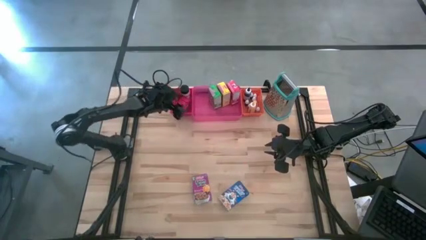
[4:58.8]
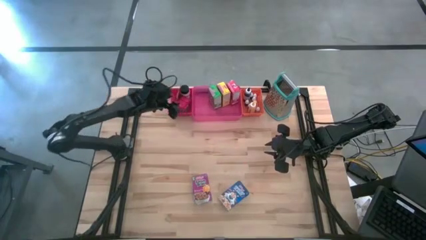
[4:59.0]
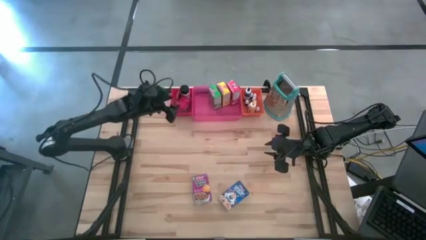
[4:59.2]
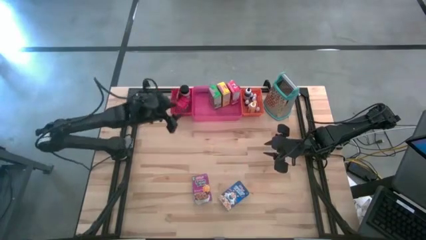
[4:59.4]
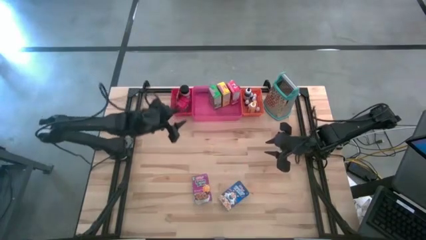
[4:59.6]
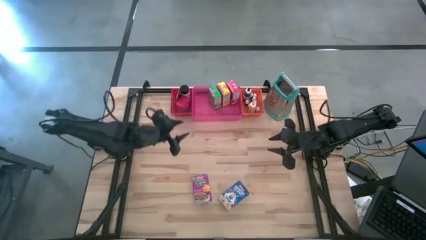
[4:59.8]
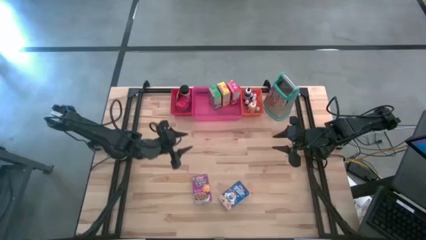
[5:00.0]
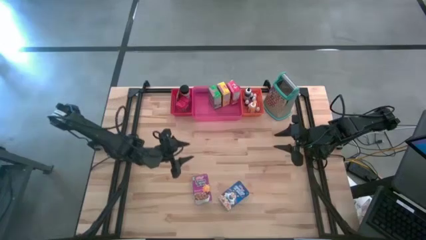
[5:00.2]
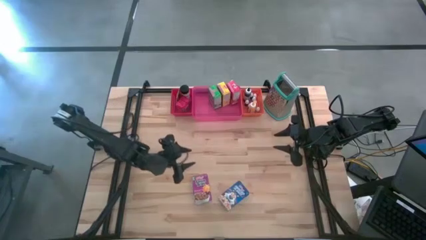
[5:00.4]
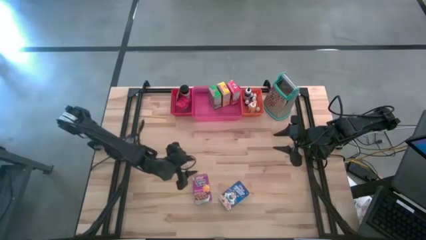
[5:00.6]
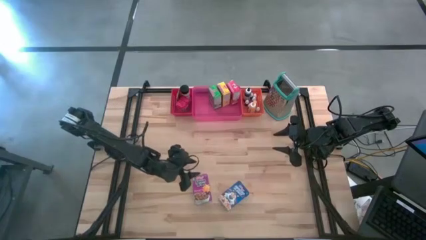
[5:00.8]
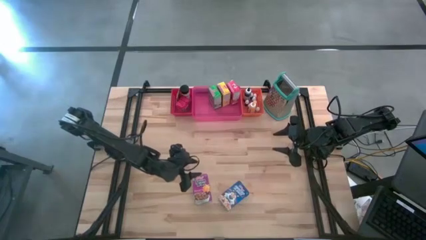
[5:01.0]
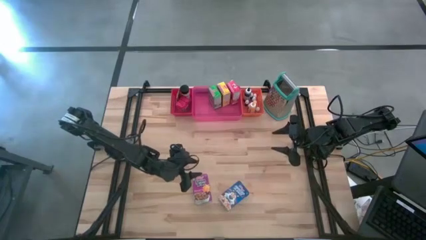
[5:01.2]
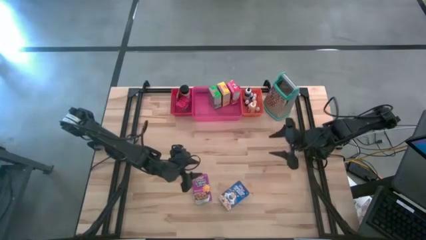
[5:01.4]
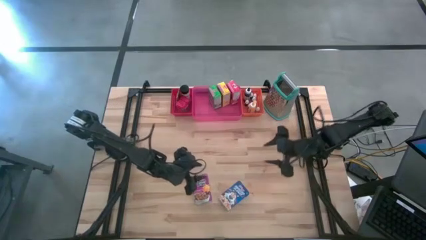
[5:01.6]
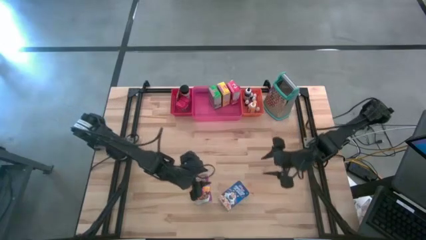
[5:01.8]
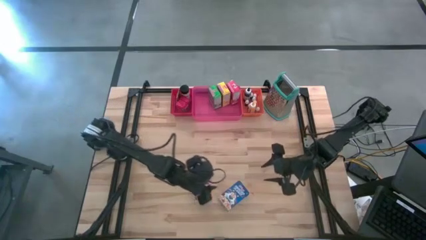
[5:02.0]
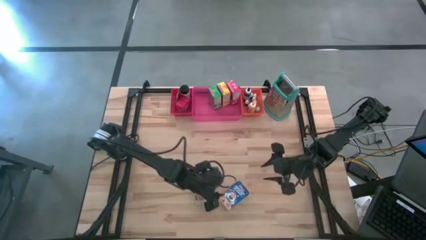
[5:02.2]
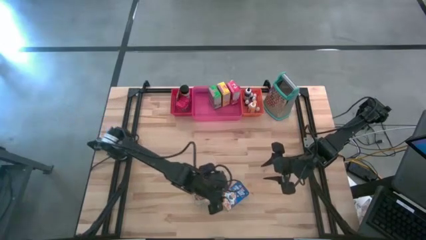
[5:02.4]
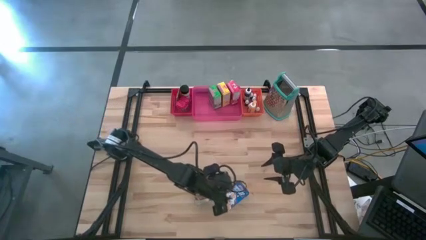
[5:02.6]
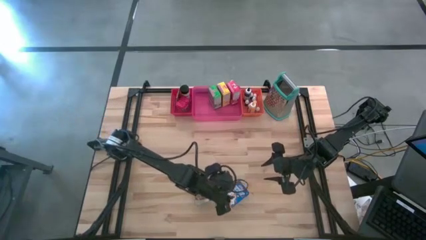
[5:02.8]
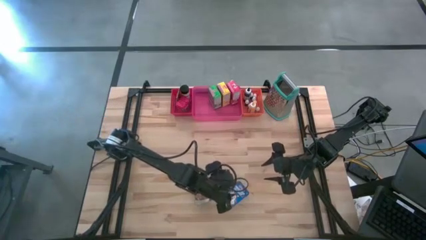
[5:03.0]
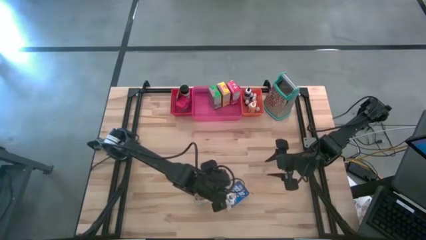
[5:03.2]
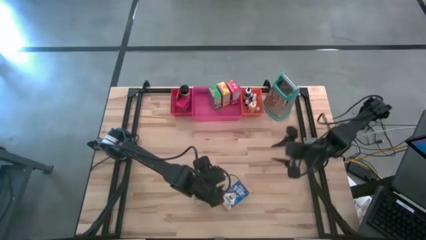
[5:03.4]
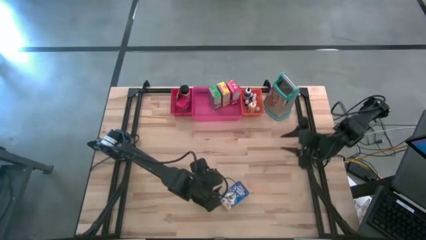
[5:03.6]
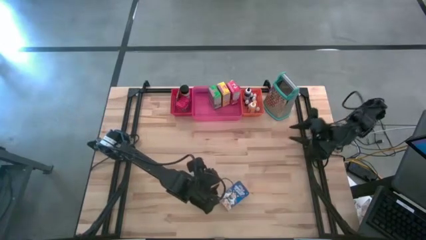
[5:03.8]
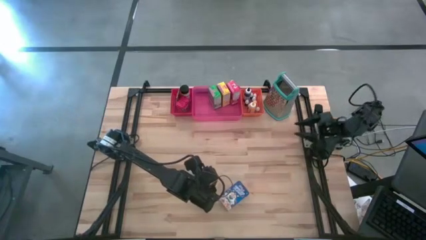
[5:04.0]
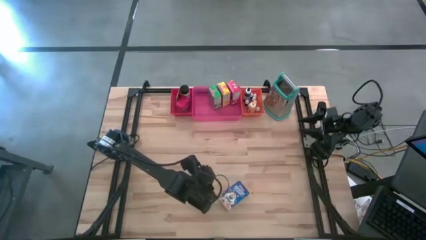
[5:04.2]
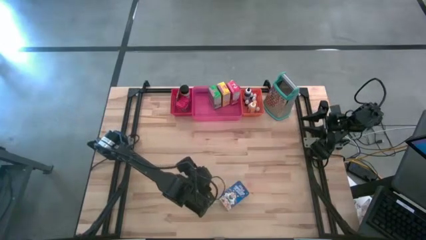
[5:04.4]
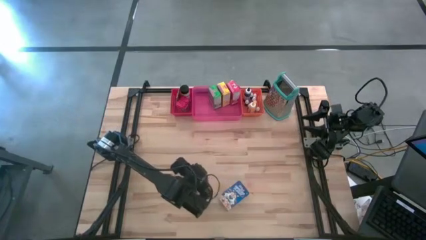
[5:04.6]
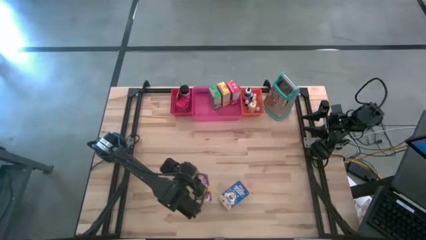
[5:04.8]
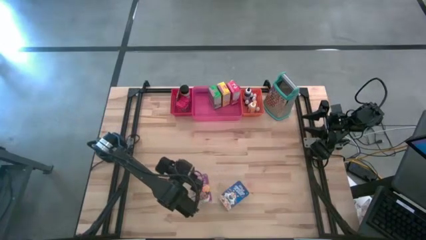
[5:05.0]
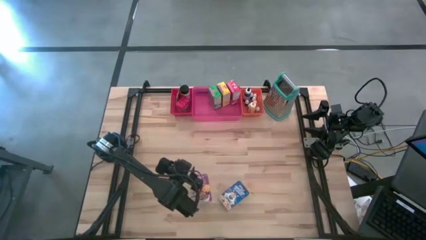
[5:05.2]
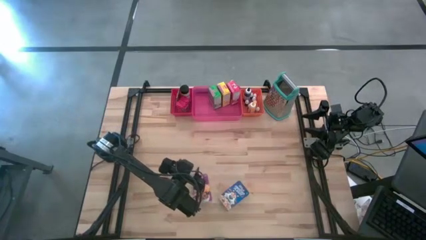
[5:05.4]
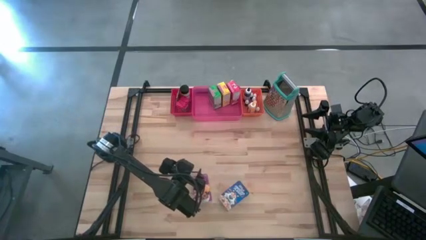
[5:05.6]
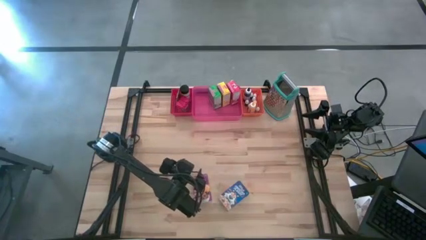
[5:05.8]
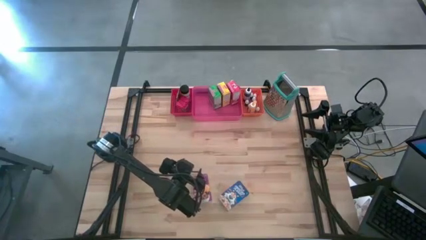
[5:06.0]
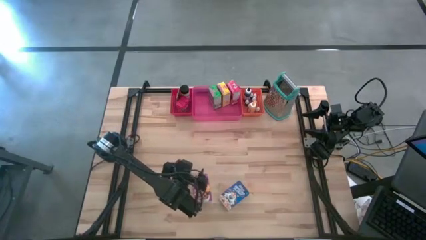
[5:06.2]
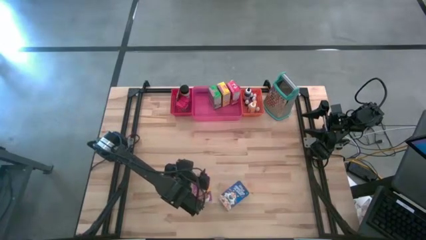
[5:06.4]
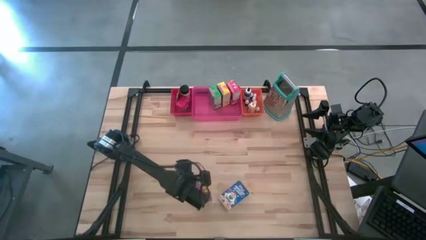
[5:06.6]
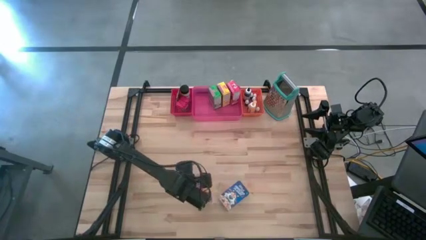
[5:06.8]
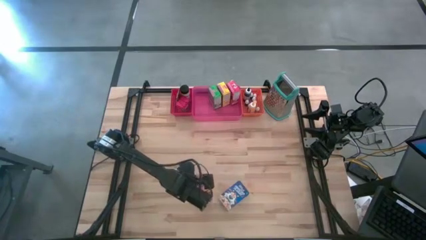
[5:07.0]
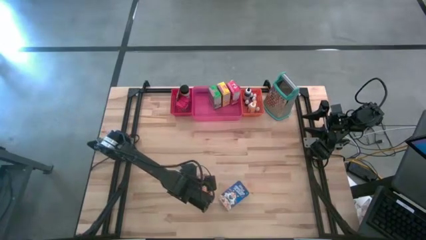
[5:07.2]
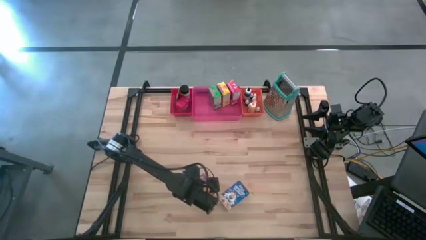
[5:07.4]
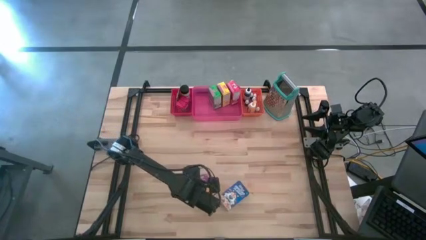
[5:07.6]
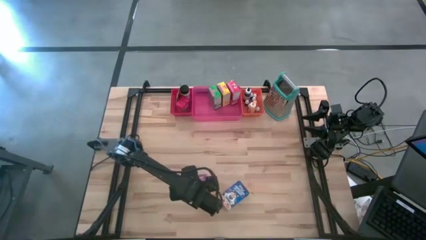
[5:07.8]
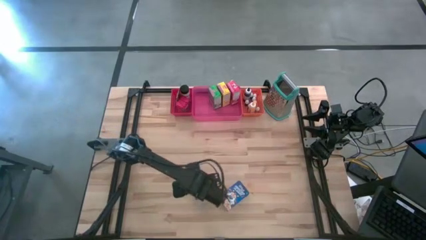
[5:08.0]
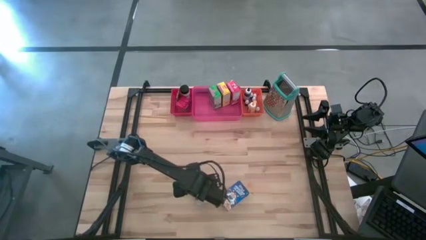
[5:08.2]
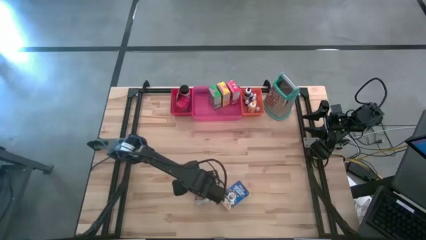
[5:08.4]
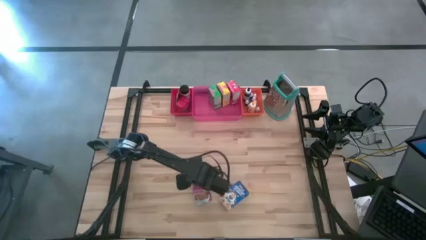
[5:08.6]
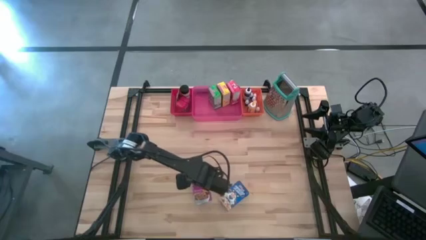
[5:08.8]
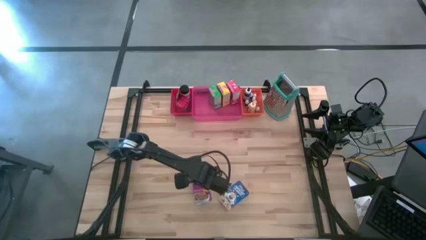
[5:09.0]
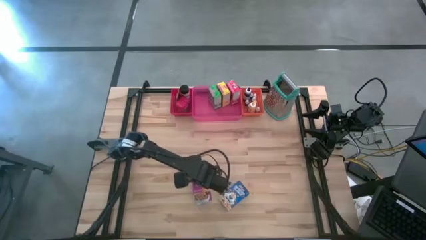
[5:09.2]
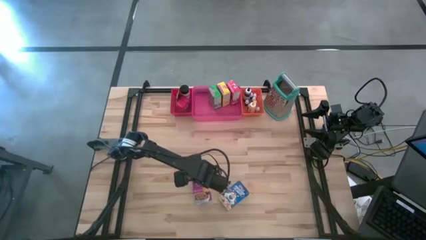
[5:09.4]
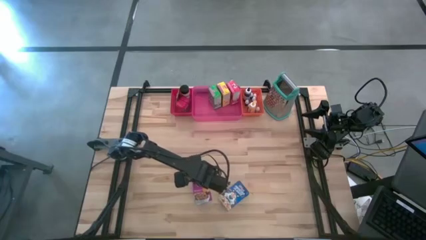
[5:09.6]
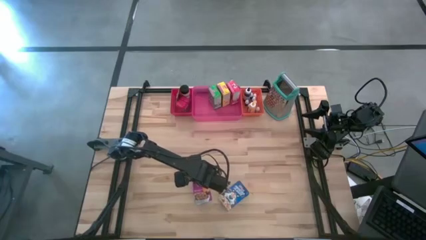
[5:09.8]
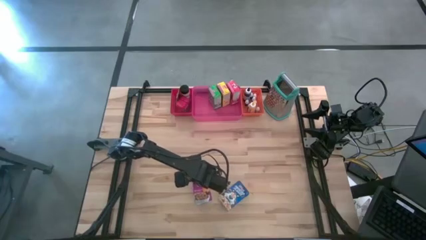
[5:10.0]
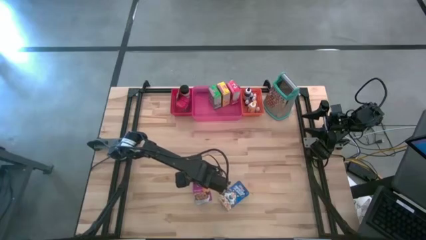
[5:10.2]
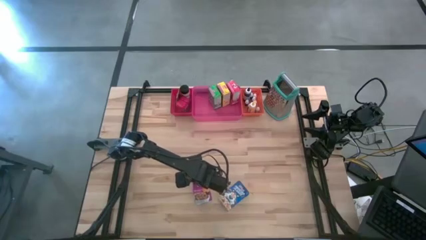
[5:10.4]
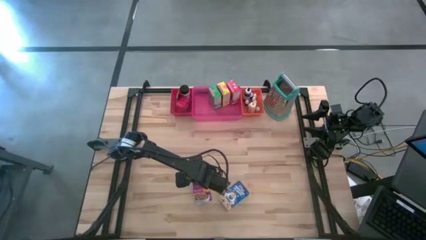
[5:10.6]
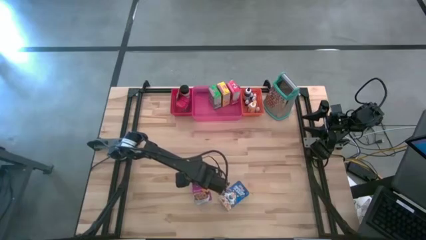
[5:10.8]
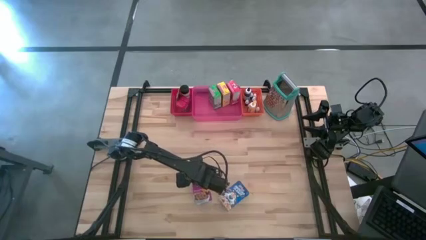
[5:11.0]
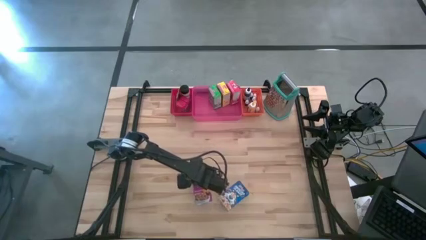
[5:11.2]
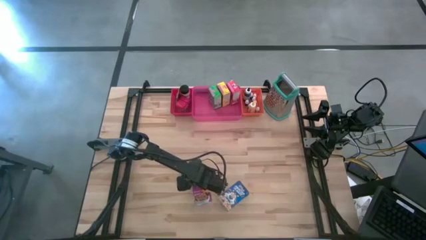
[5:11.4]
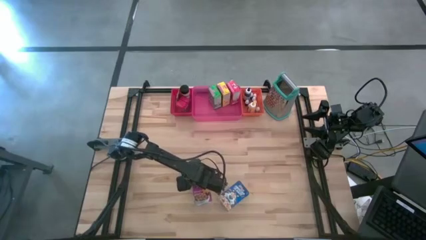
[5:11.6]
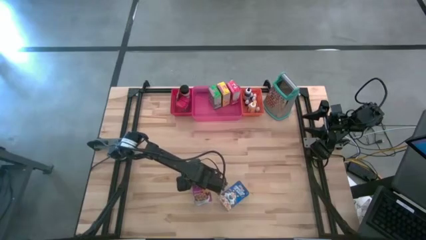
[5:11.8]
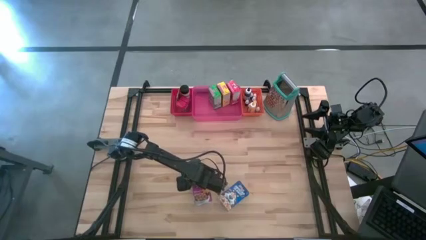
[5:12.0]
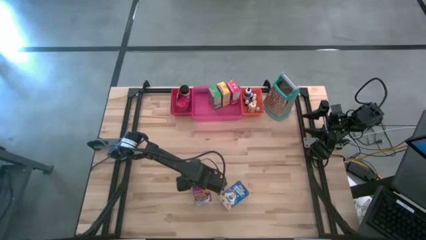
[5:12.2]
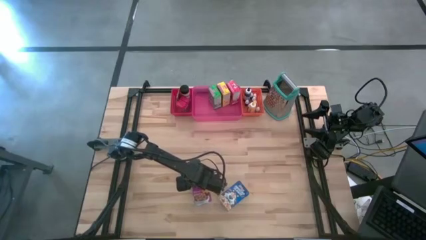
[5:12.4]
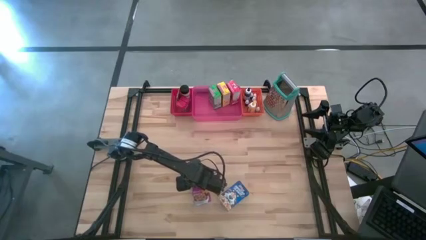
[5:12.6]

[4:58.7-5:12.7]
Task: Pick & Place Kitchen Items
Put the purple cereal box into the pink bin
